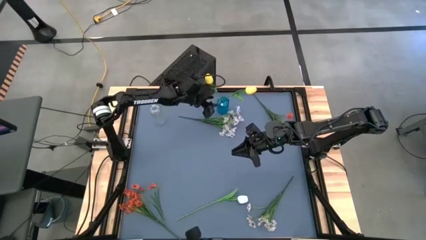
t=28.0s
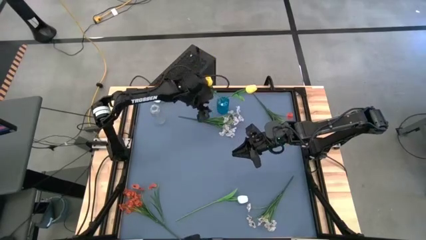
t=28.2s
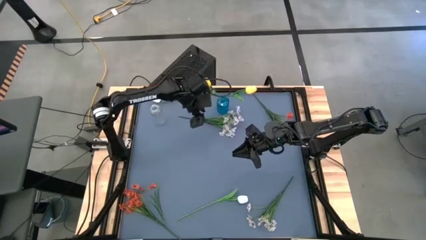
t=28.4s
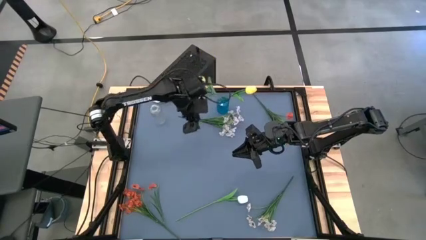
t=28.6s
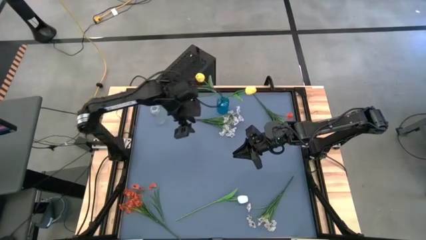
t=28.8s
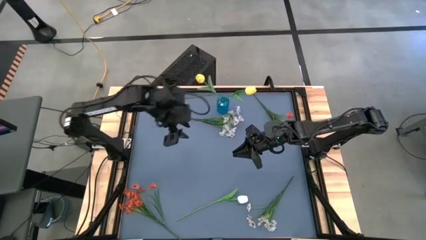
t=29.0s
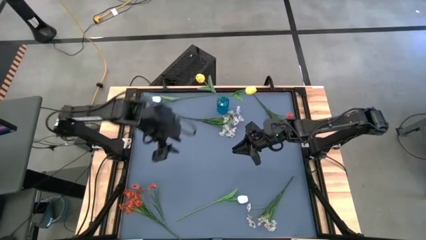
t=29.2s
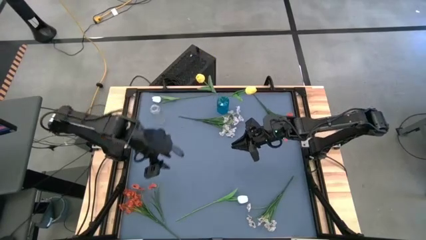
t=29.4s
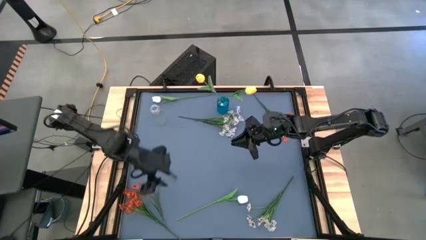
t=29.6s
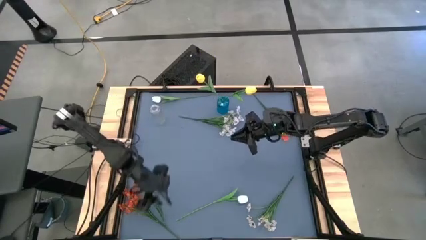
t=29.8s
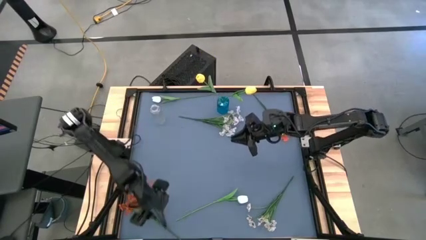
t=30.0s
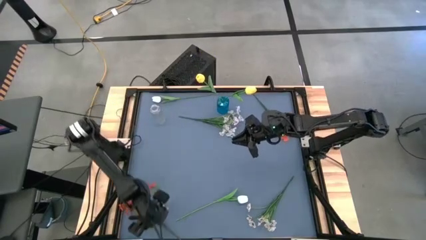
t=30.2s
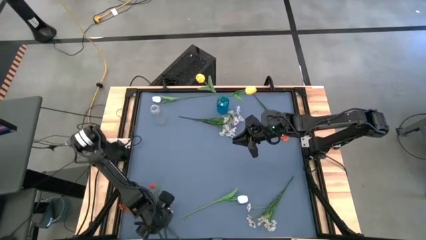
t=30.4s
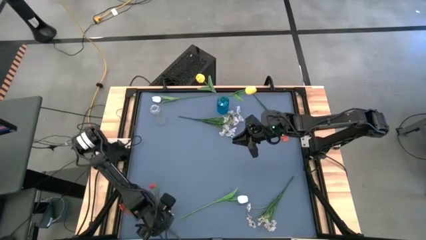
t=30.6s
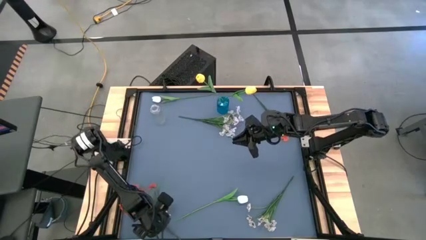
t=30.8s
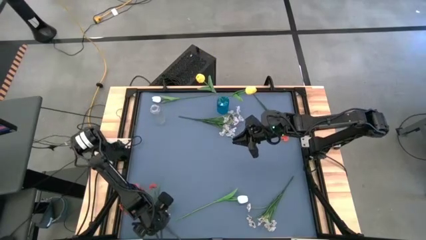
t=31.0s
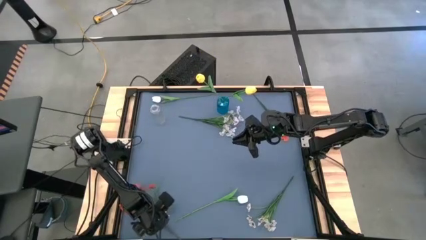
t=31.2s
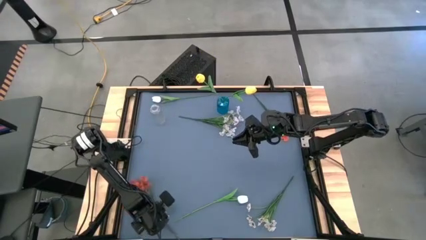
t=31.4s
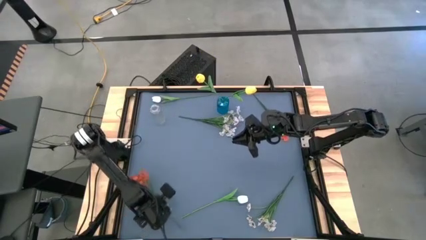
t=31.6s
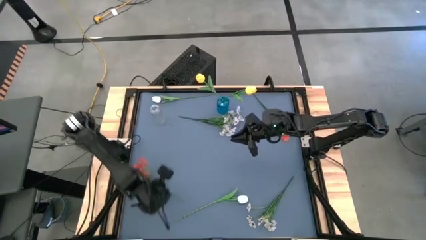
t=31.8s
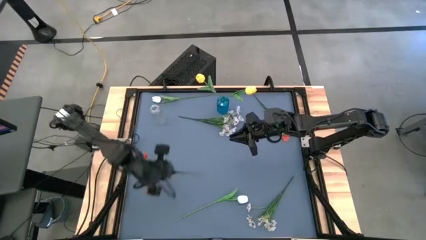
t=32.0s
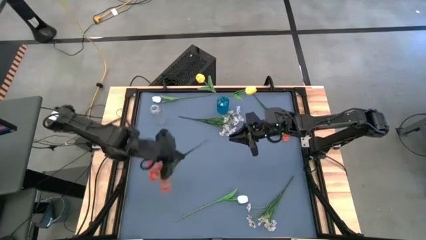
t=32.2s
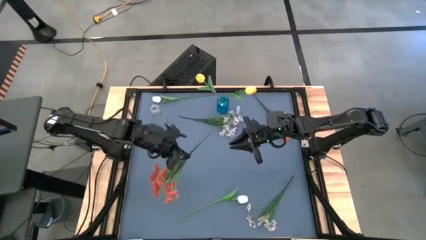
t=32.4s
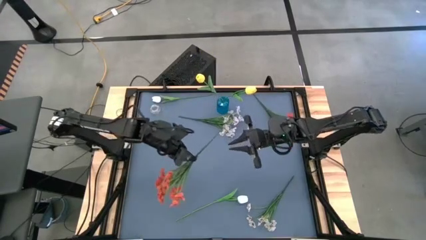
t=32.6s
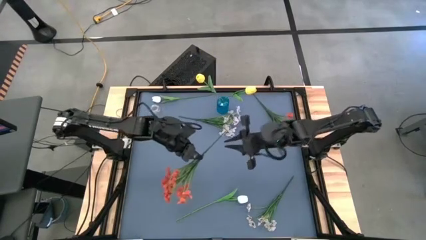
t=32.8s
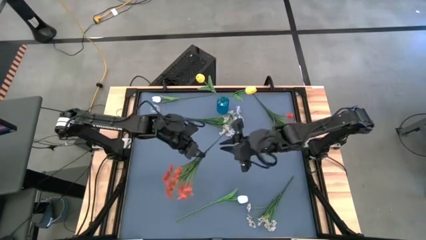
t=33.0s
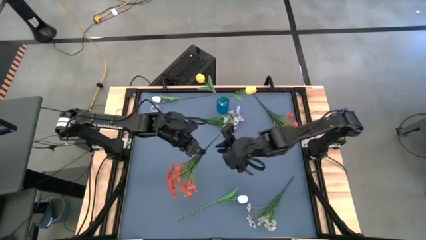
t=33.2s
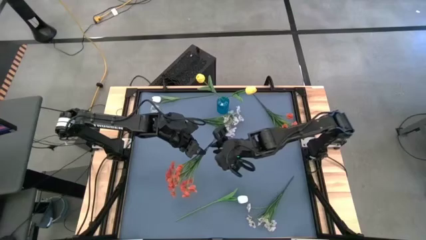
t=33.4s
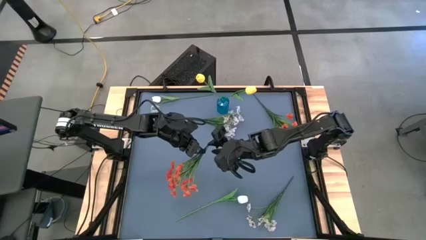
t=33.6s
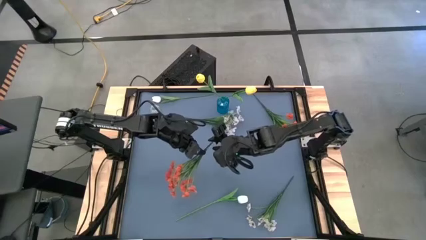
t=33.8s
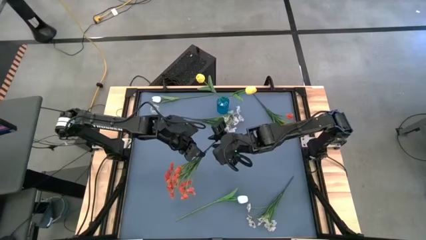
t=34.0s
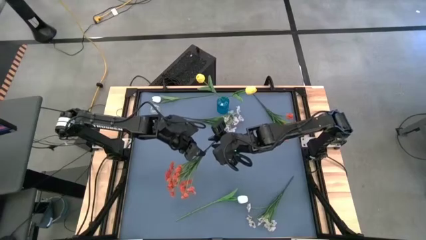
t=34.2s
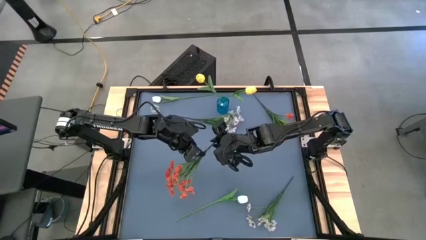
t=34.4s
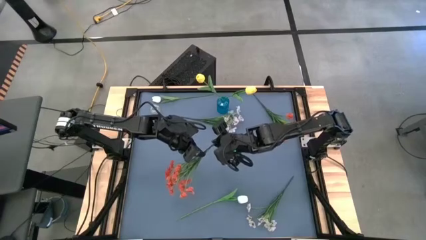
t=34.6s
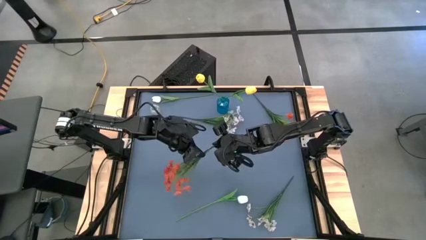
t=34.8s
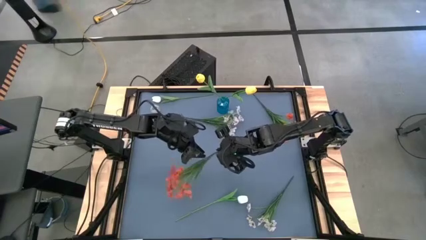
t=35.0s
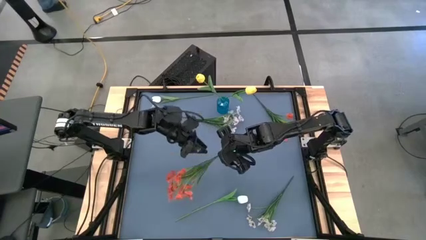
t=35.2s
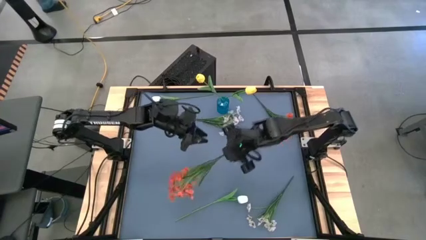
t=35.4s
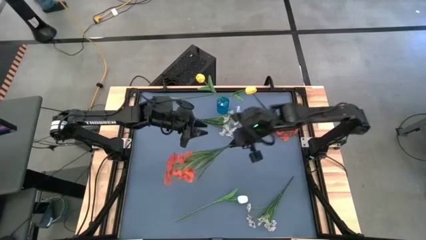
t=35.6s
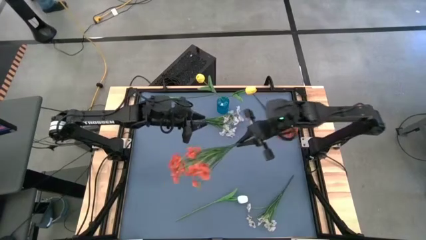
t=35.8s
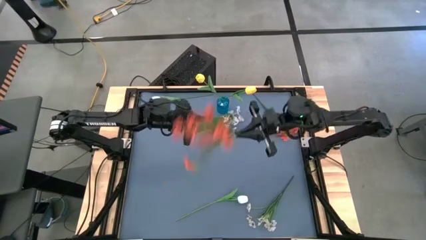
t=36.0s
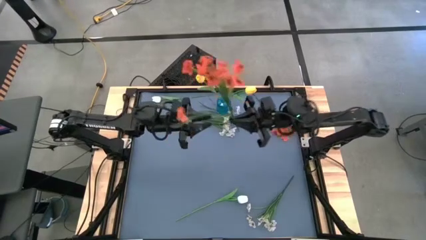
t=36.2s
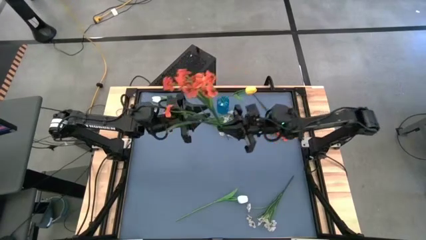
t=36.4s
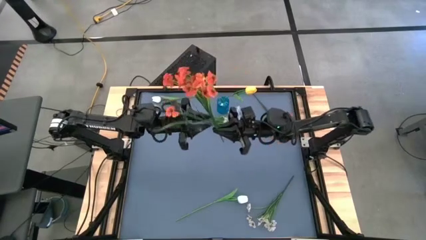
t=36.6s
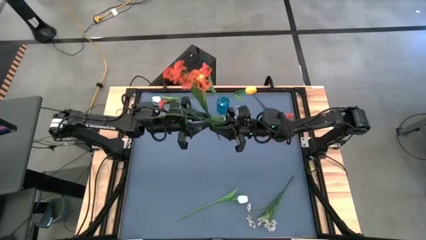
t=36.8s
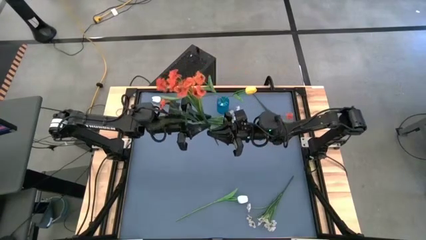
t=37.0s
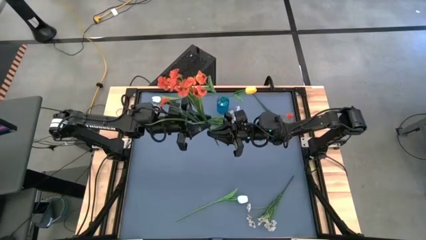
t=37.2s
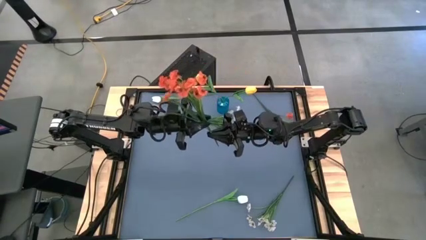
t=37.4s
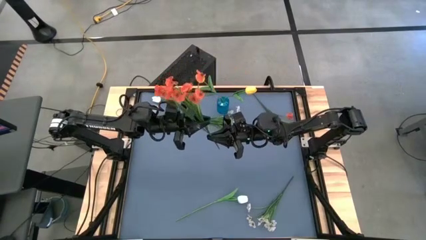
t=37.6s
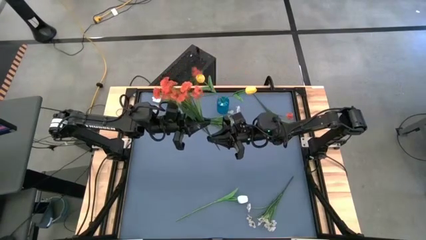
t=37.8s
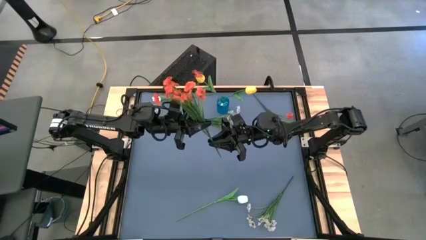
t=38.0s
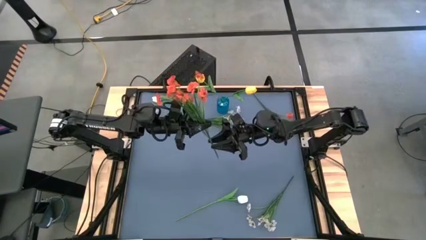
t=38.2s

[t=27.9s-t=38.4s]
Task: Sort flowers into vase by color
Put the bottom orange flowers into the blue vase

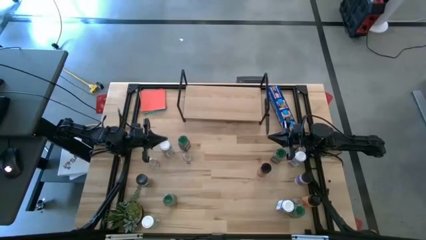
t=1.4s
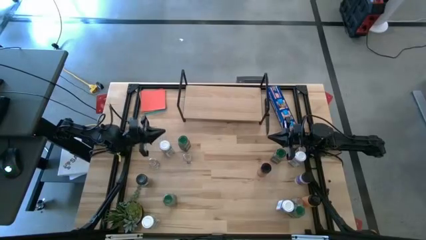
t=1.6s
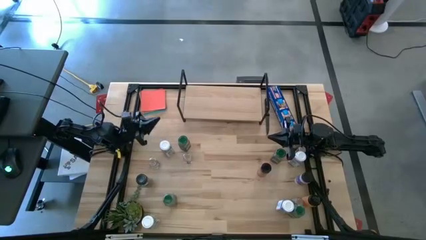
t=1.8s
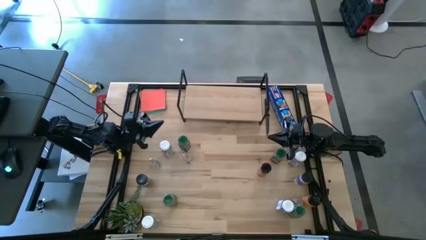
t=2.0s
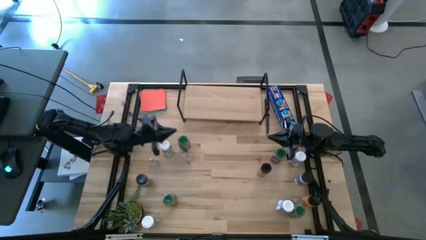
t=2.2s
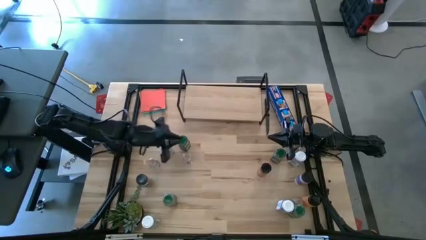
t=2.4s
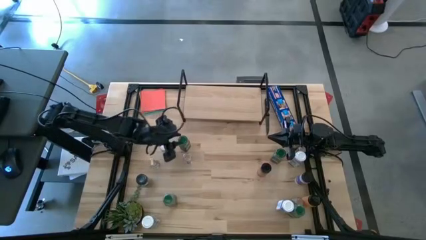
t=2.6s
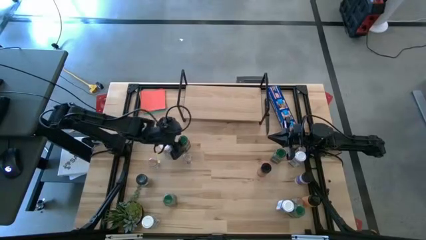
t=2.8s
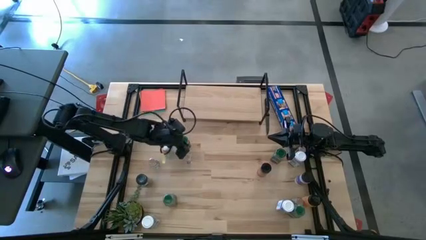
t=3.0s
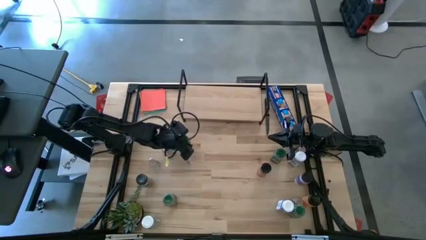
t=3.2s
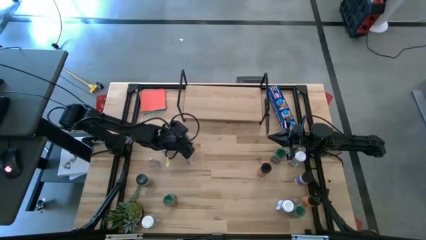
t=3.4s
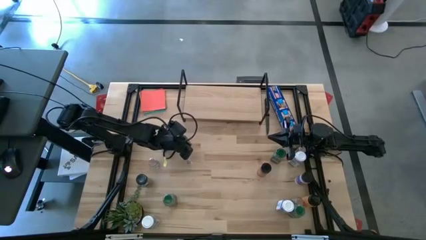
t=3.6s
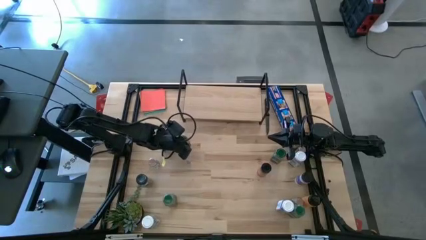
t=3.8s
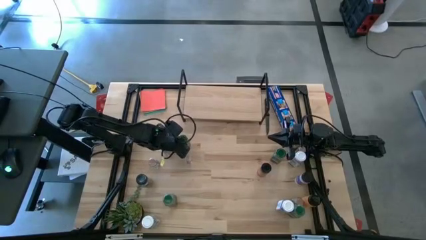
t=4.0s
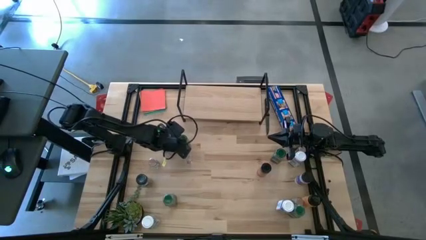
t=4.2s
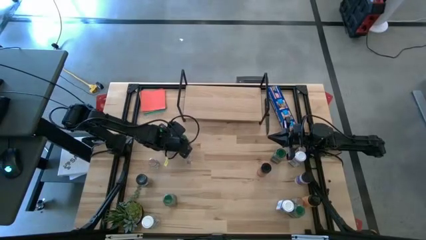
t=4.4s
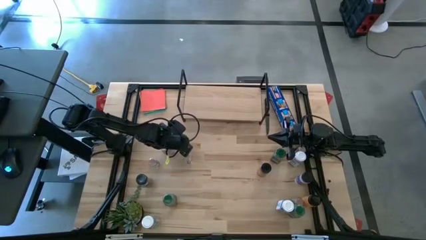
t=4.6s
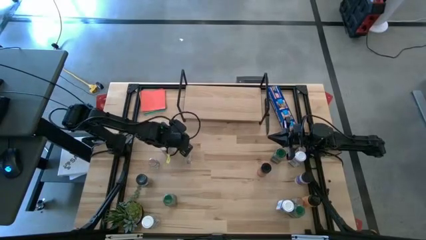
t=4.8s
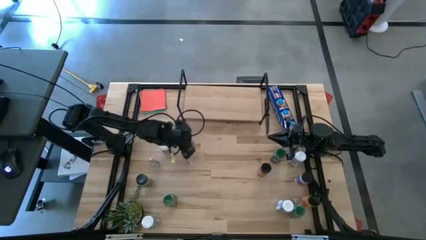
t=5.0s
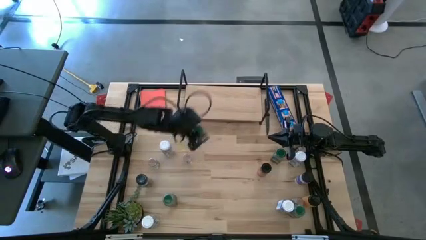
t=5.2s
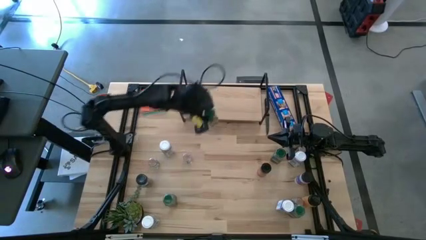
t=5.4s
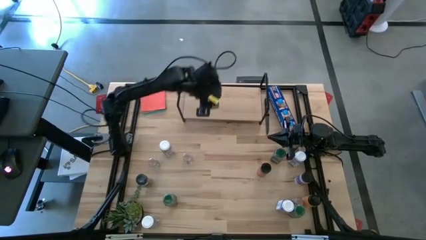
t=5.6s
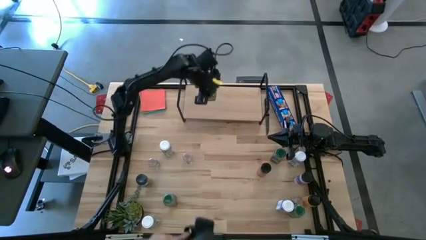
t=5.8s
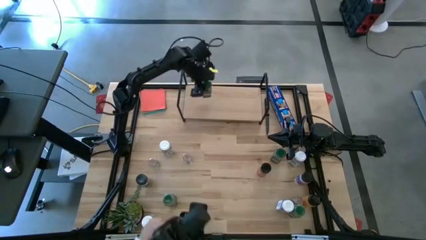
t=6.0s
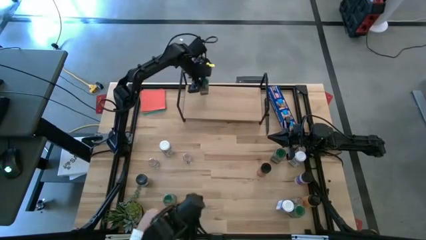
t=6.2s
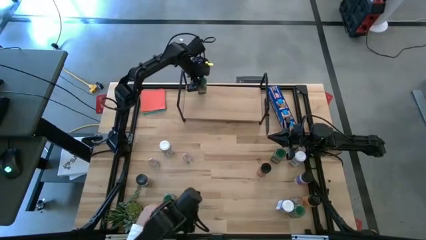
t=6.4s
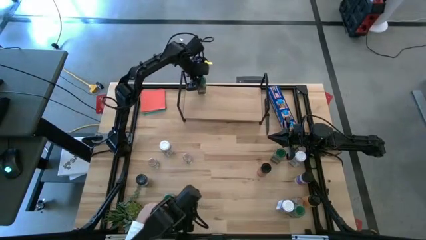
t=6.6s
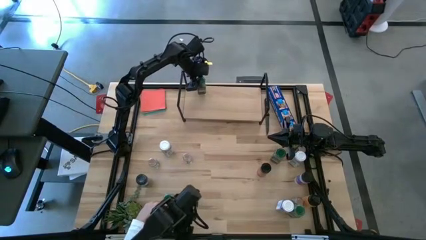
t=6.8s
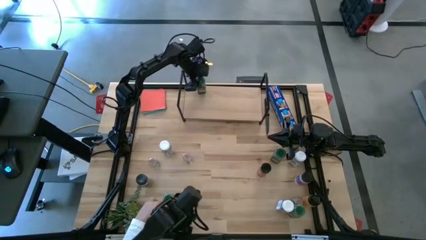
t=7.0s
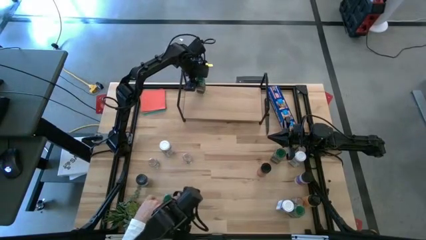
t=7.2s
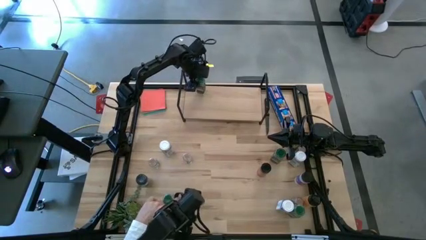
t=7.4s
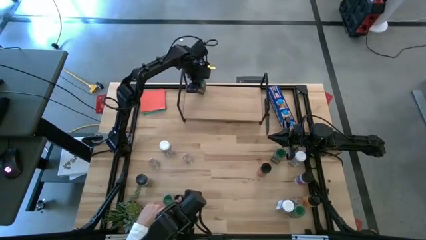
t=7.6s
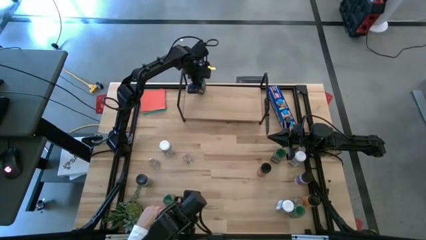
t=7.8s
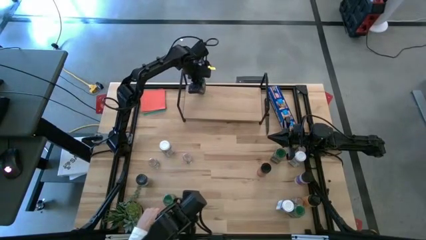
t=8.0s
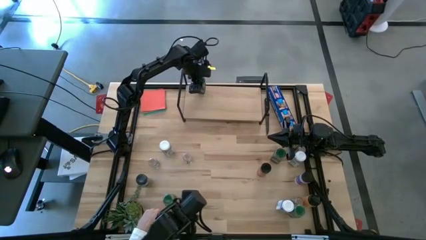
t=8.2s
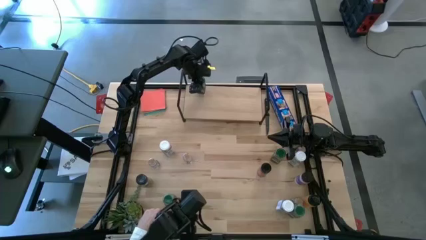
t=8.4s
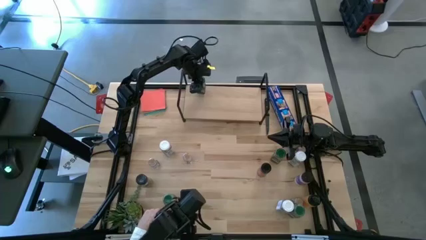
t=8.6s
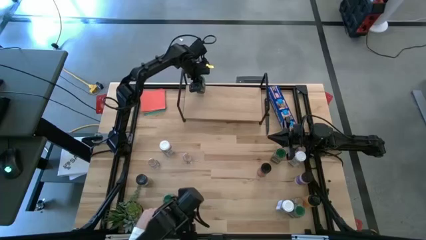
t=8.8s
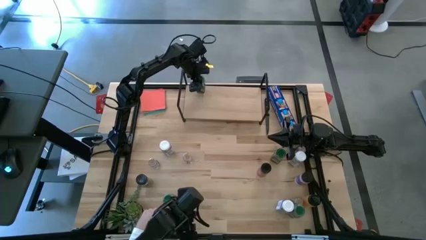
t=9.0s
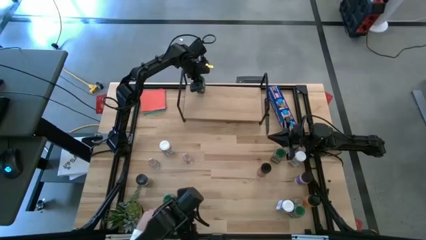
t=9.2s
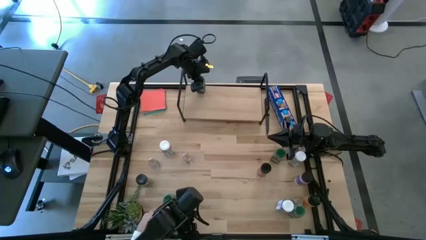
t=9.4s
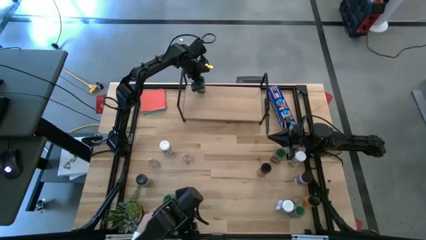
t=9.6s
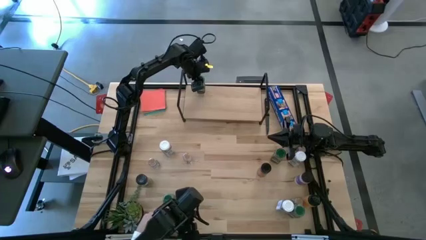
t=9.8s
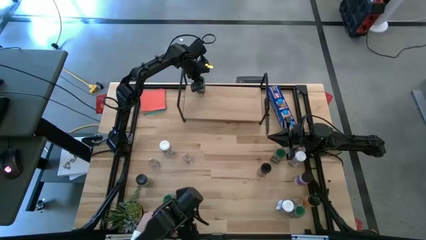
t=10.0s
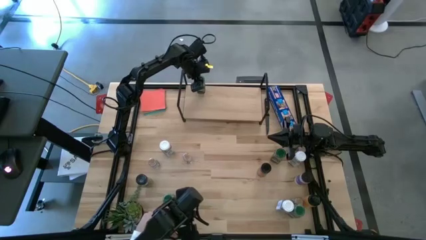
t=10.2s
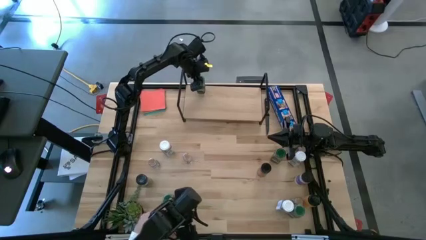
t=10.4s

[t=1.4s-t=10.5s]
Task: Shelf spices
Put the top left green seasoning bottle on the shelf
